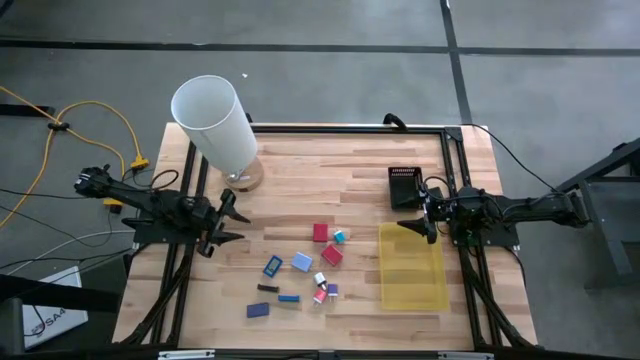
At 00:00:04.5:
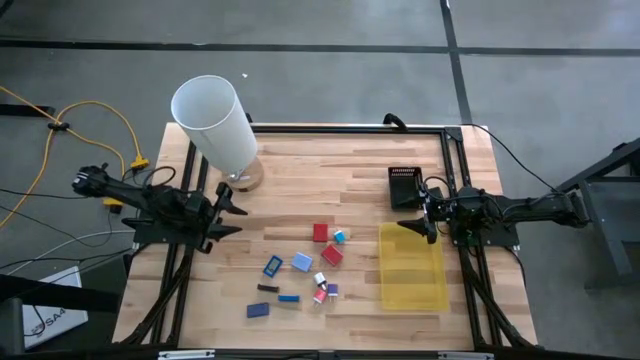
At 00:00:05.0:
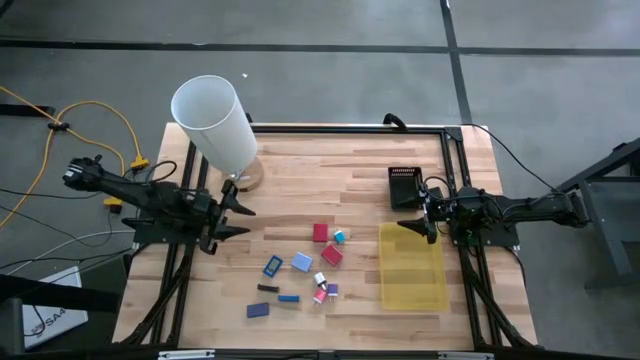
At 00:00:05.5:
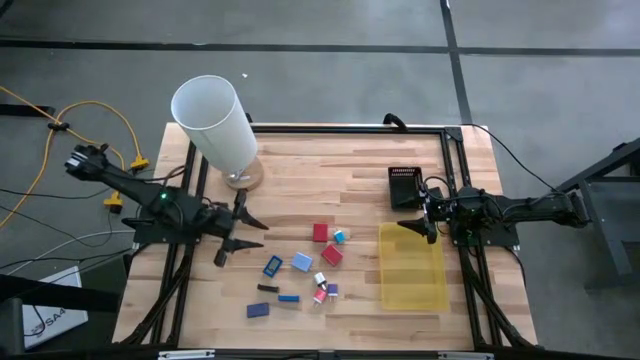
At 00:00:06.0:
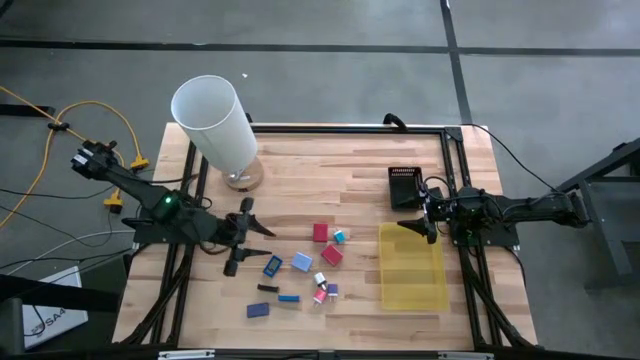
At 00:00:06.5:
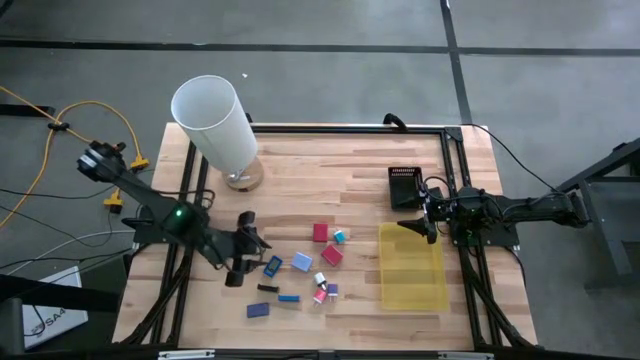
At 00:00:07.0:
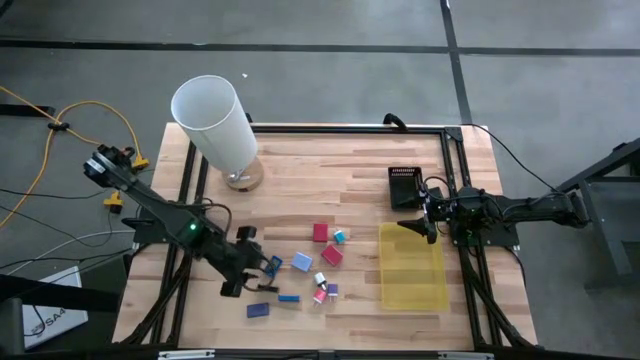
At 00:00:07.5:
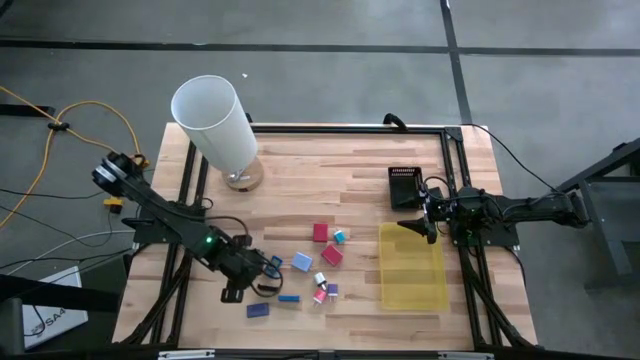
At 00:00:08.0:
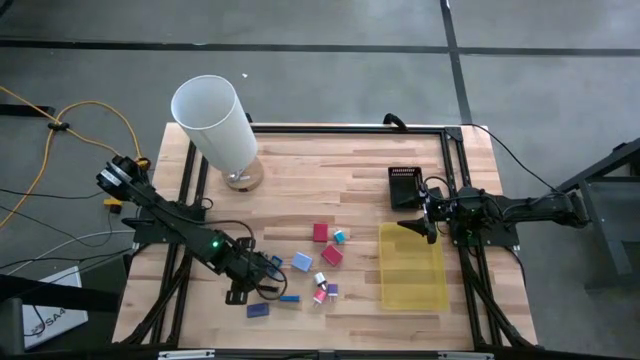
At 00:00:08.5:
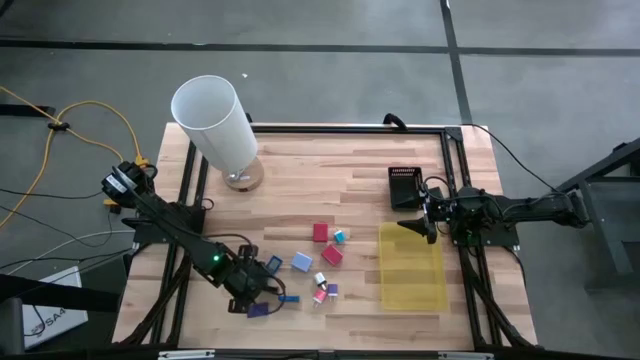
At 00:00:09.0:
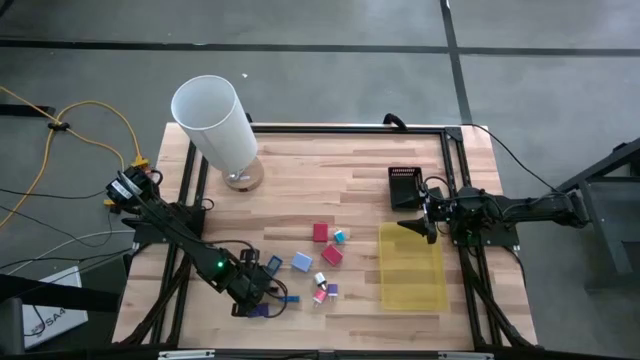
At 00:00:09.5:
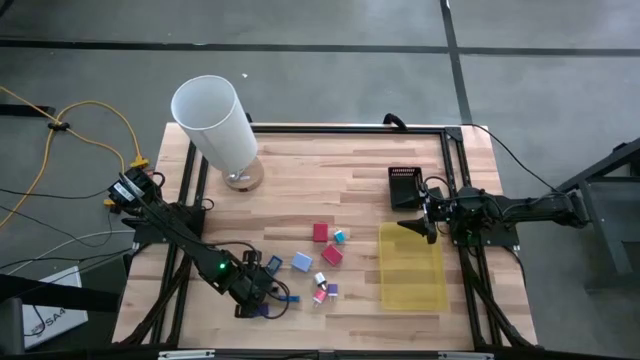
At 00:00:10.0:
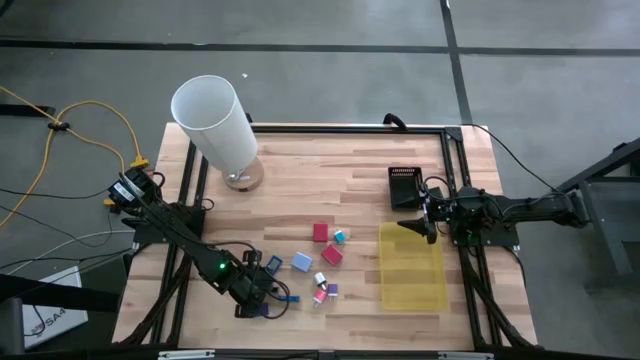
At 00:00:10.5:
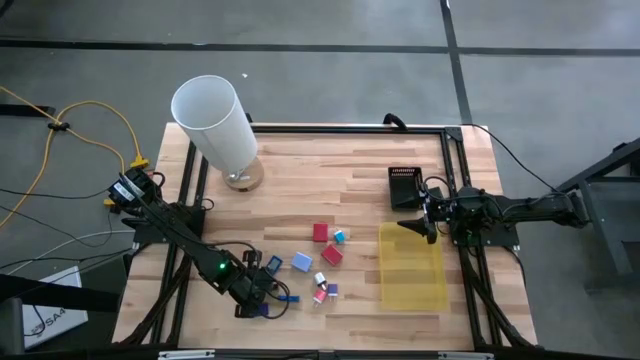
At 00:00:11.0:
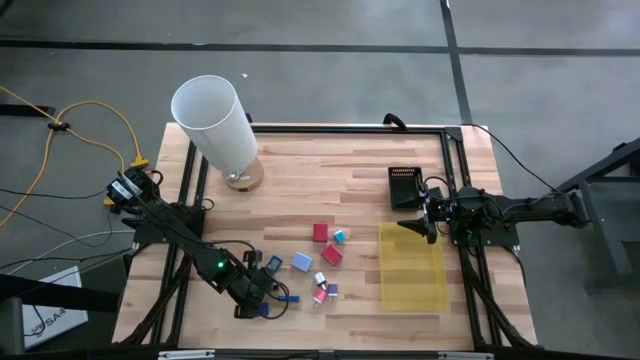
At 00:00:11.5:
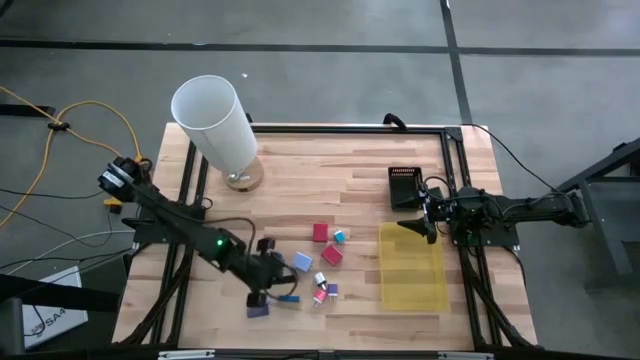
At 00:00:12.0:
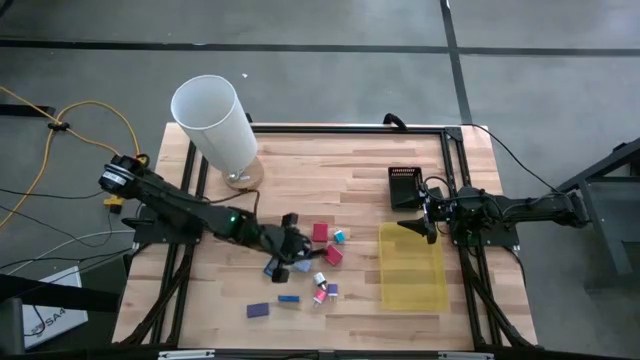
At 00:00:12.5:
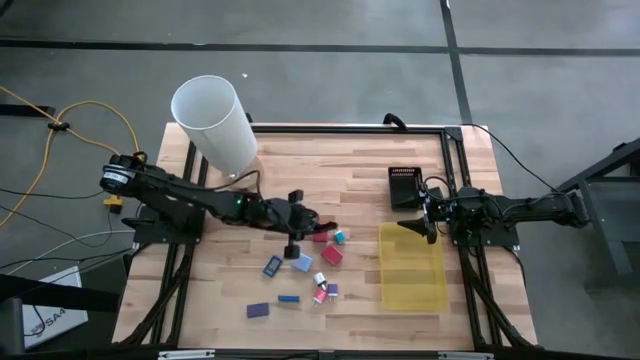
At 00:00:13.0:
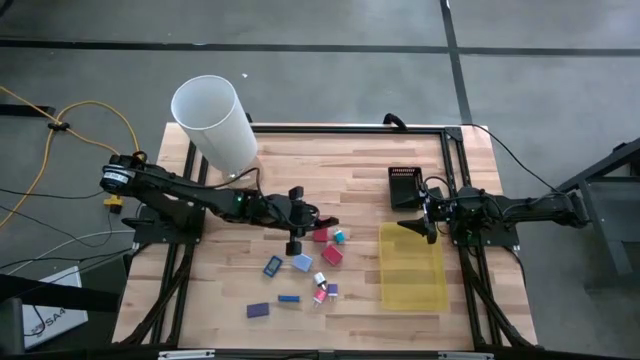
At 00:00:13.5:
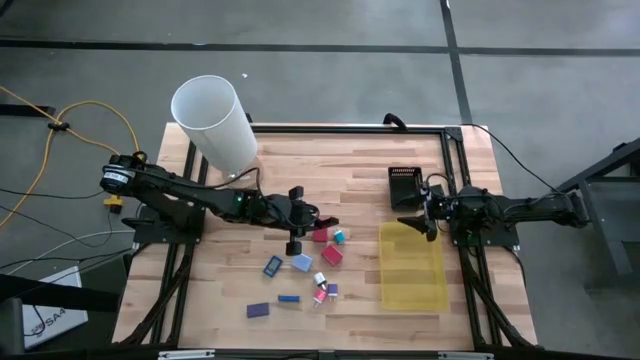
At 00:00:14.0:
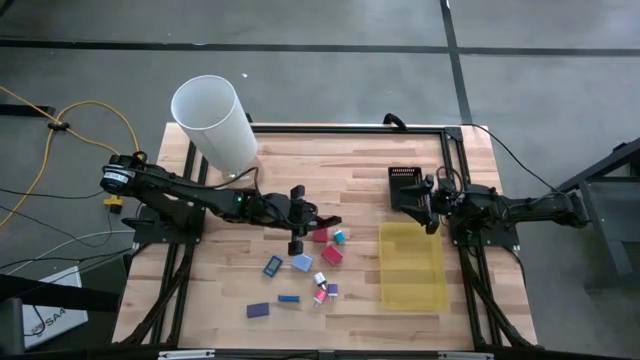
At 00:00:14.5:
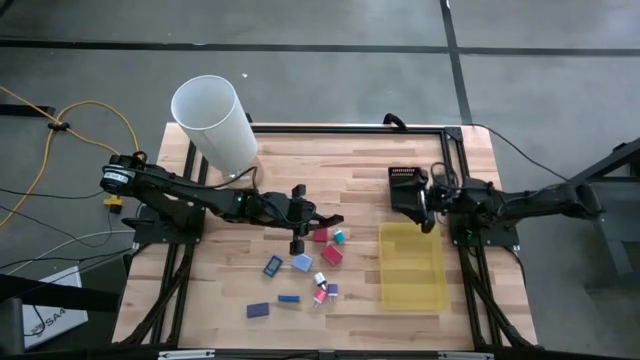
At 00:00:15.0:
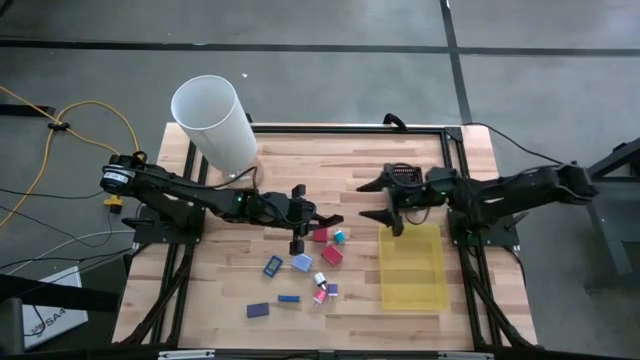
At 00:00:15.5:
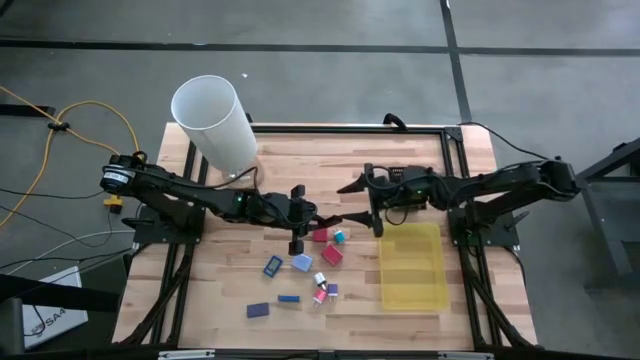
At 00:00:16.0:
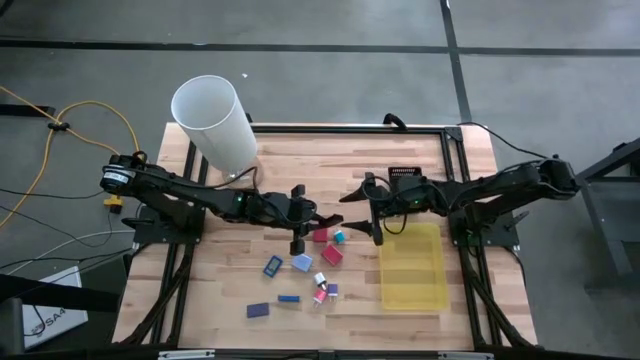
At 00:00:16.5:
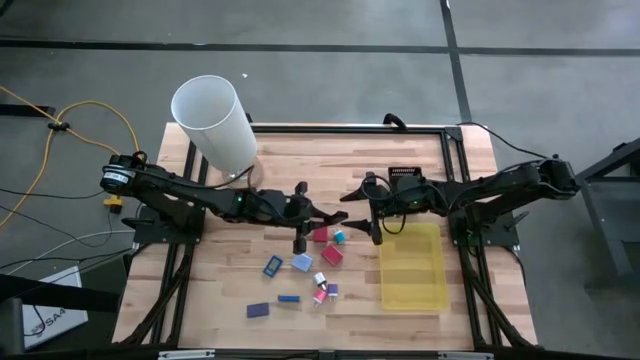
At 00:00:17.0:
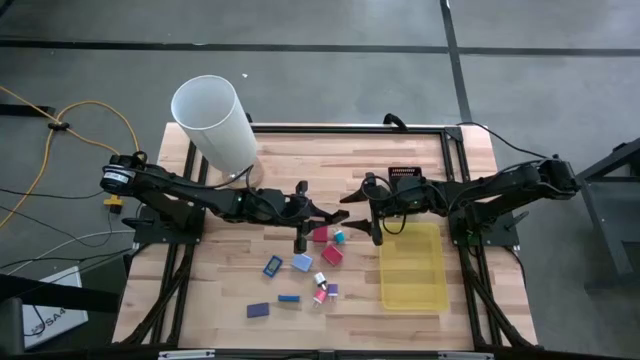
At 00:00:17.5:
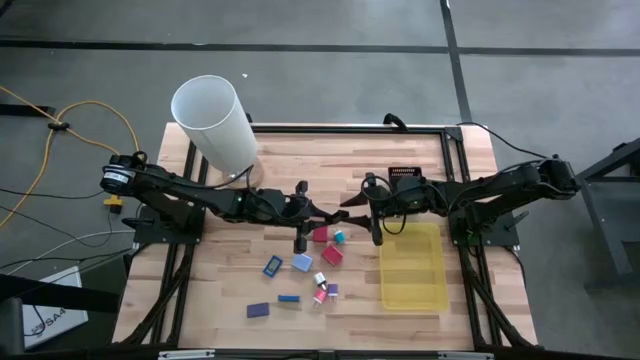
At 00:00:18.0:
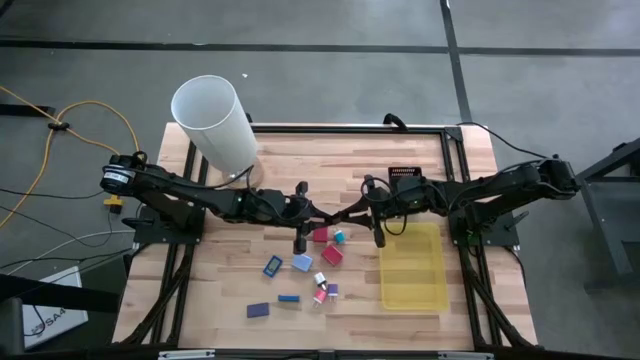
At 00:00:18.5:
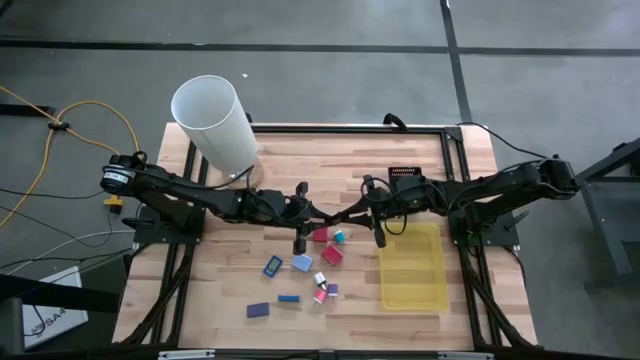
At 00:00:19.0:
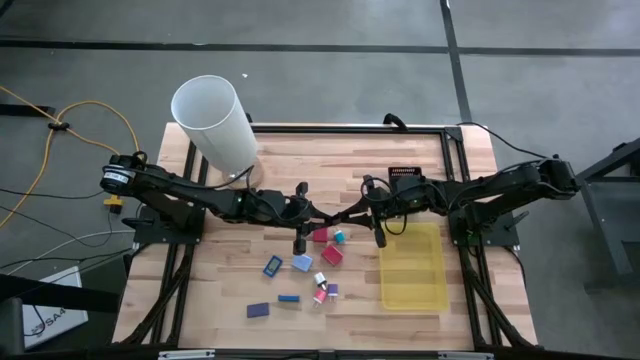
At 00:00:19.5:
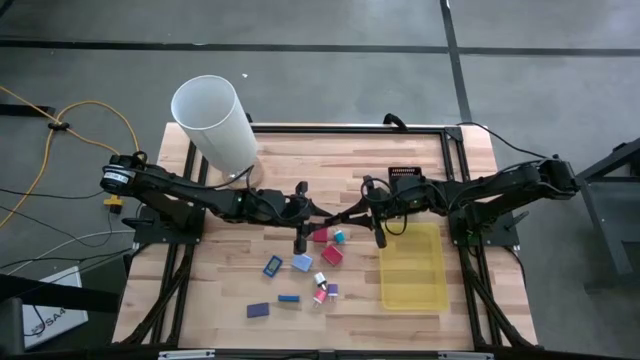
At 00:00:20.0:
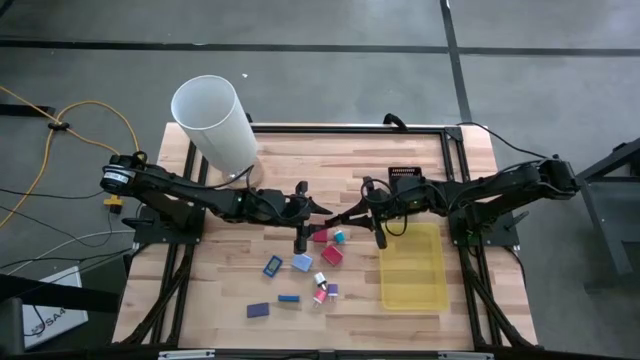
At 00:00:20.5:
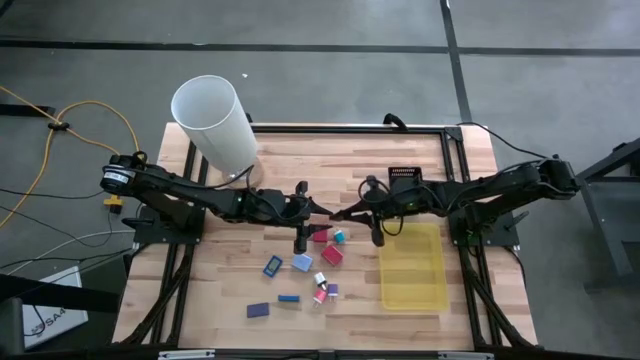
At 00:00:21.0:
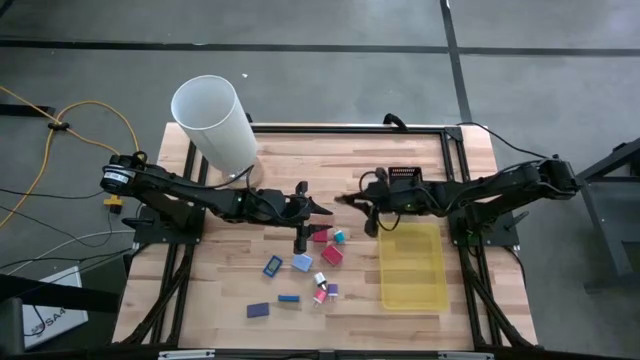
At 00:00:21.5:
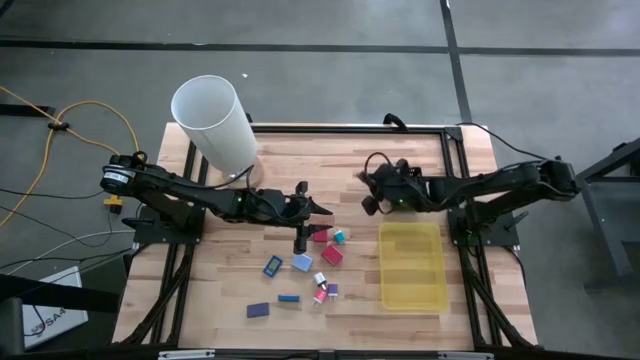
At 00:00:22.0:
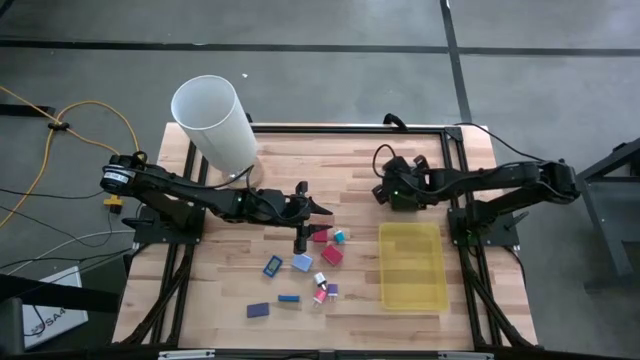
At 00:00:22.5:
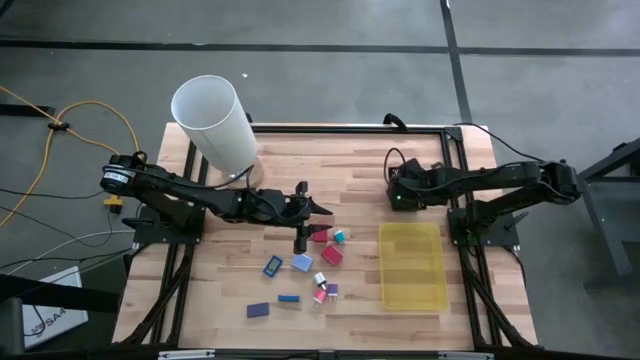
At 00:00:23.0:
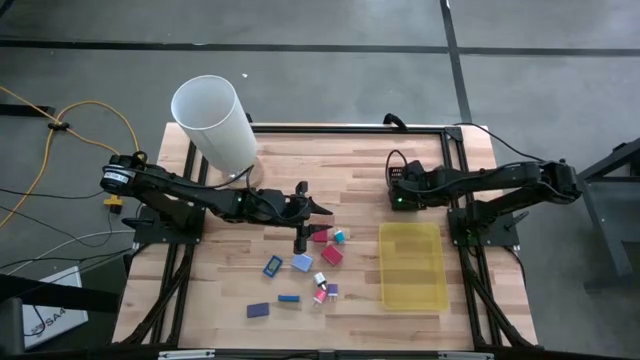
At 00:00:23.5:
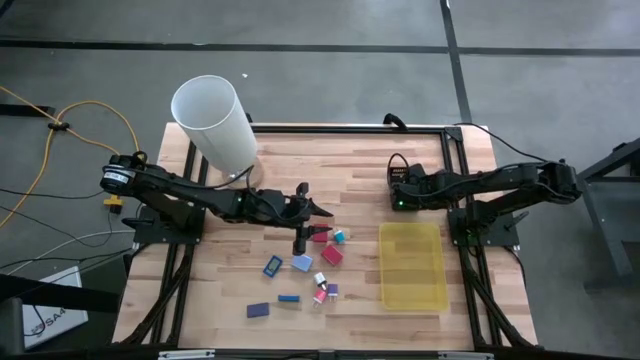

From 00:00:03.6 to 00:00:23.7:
Task: Pick & Place Office items
Put the black digital clock into the black bin
